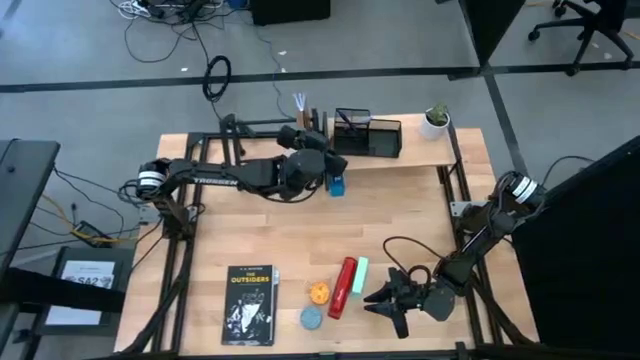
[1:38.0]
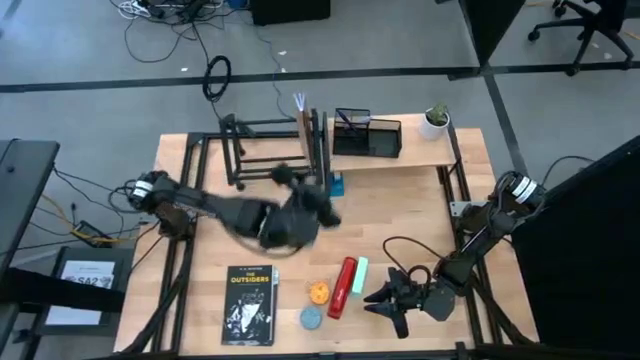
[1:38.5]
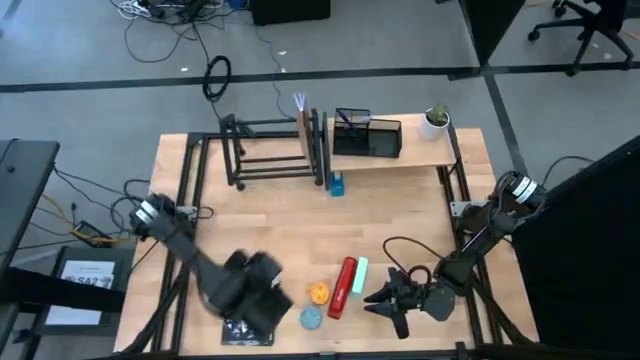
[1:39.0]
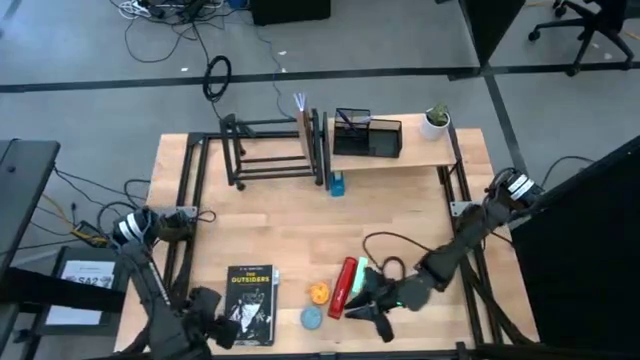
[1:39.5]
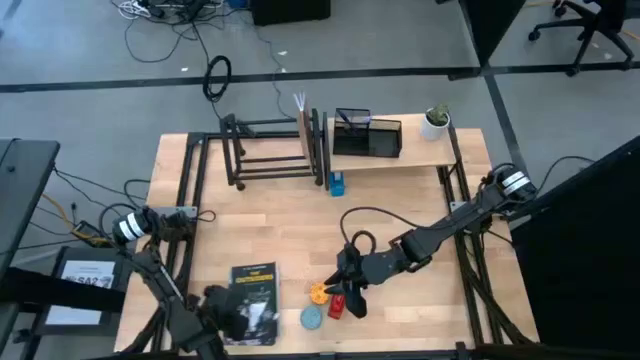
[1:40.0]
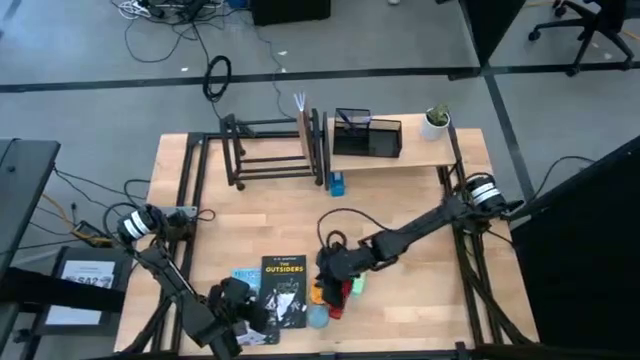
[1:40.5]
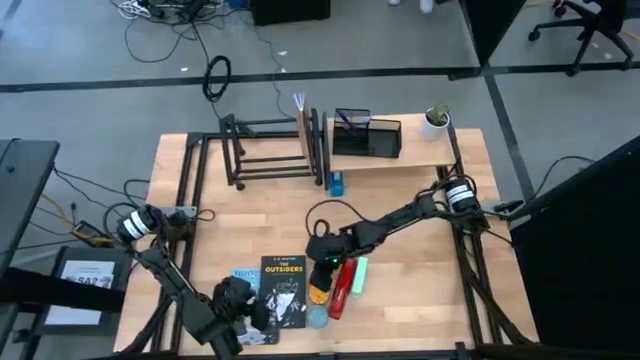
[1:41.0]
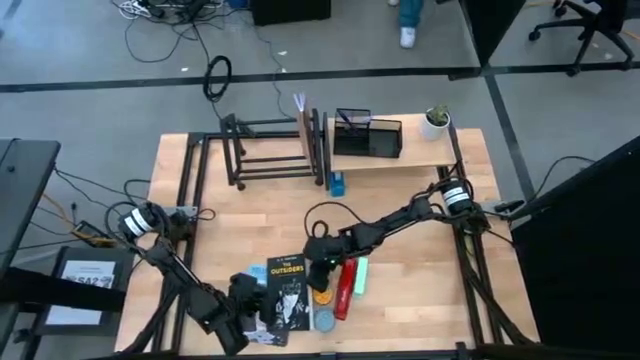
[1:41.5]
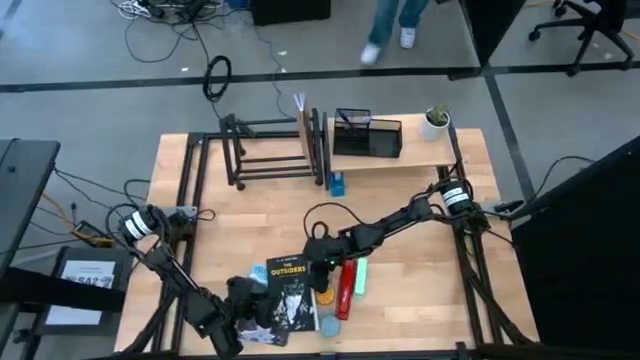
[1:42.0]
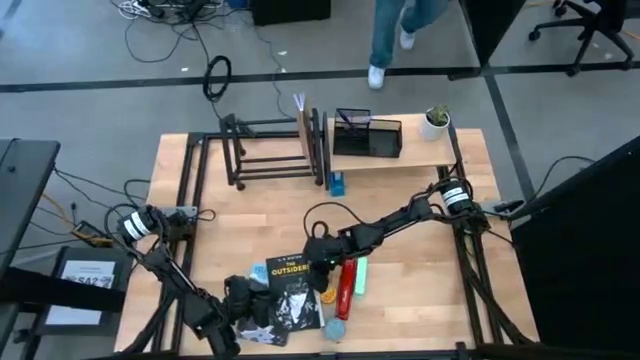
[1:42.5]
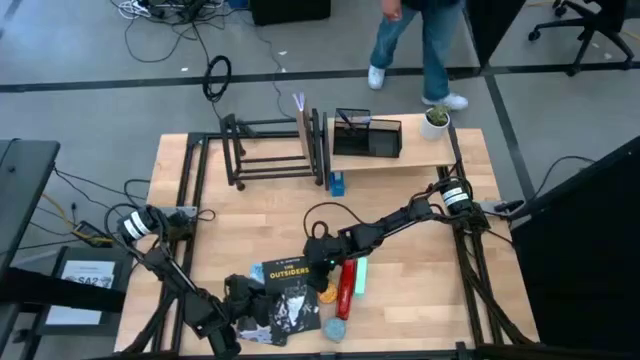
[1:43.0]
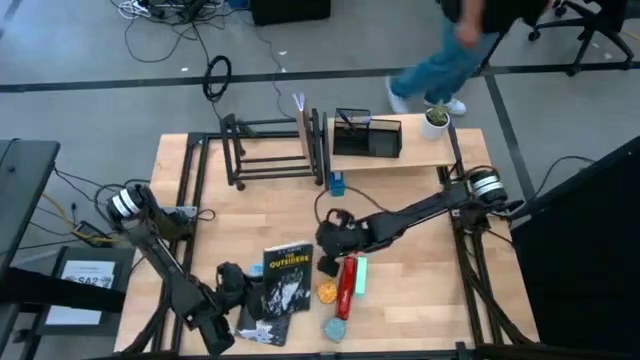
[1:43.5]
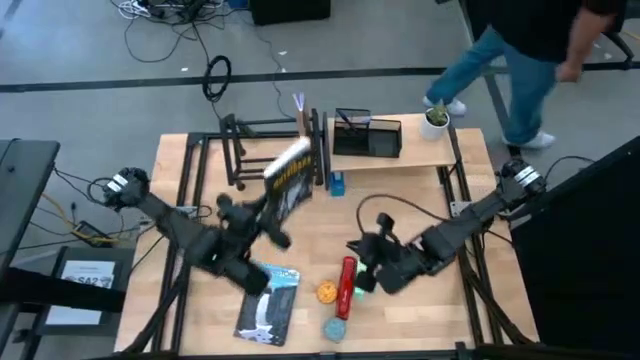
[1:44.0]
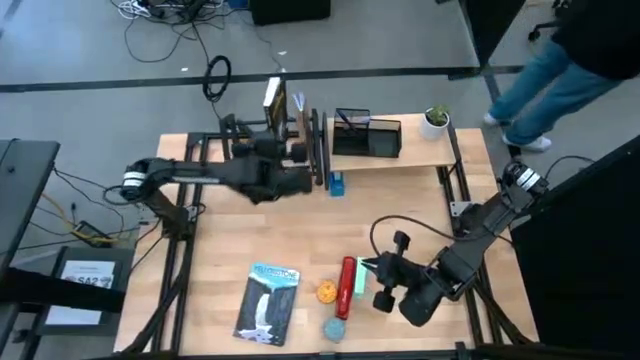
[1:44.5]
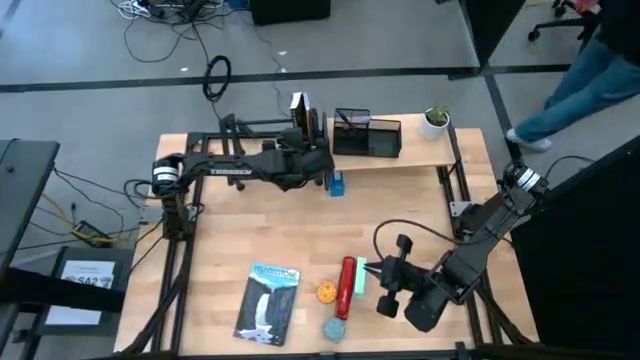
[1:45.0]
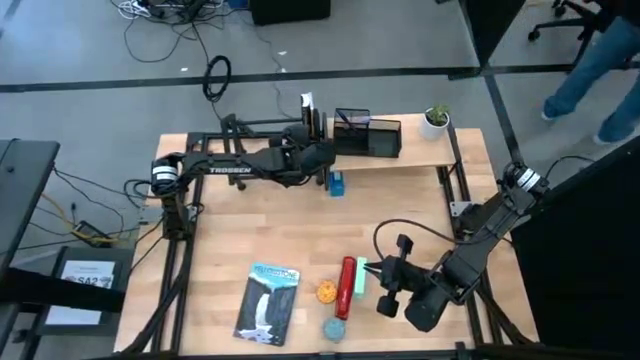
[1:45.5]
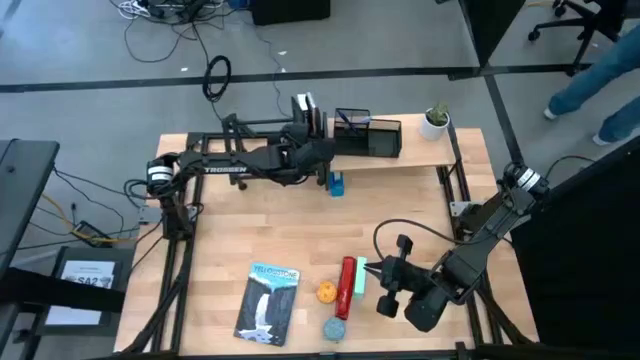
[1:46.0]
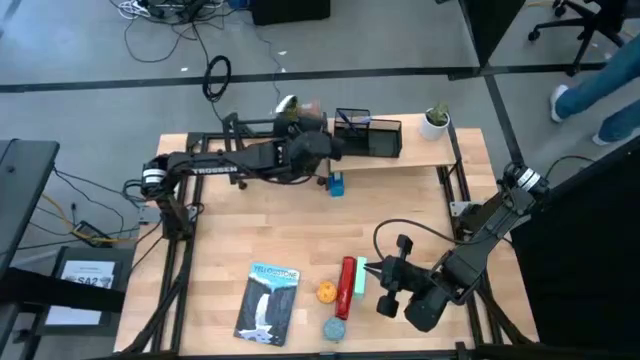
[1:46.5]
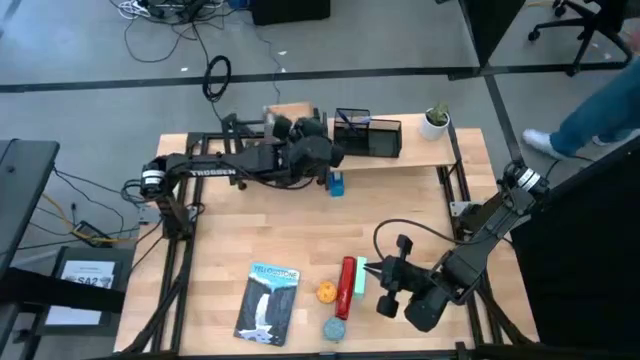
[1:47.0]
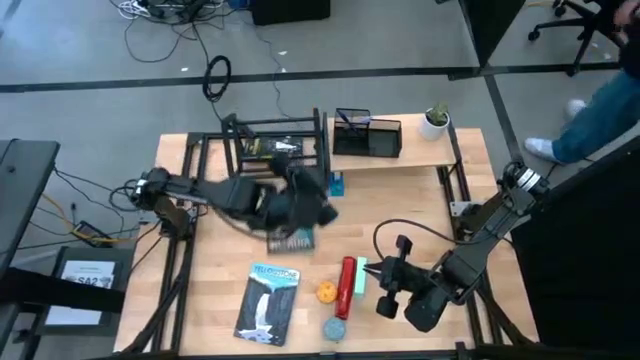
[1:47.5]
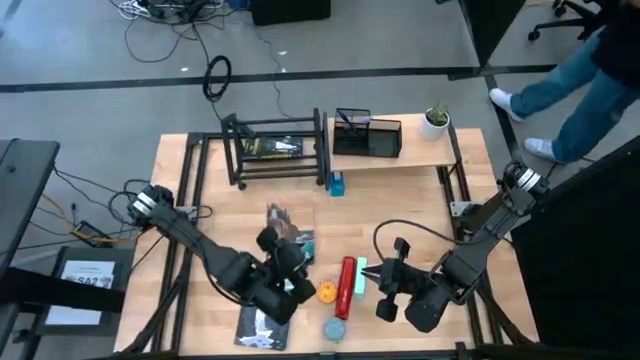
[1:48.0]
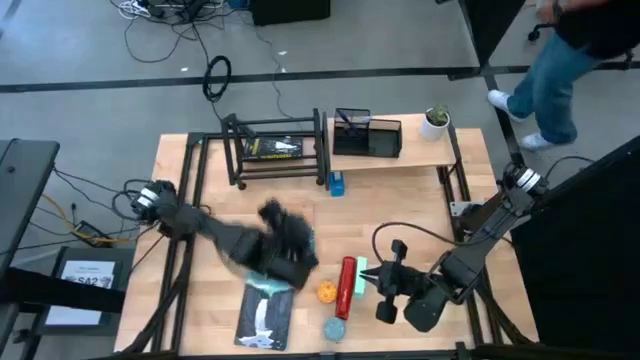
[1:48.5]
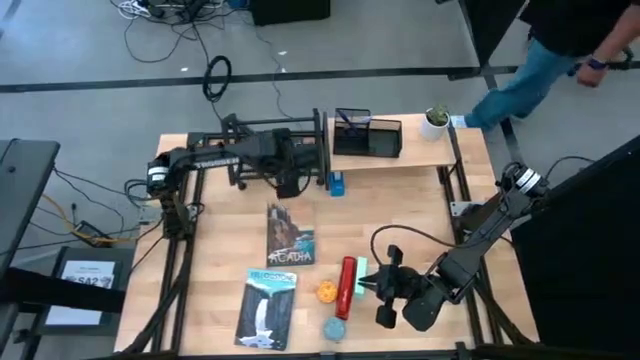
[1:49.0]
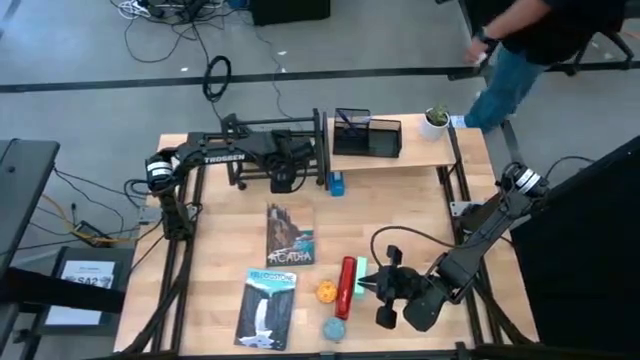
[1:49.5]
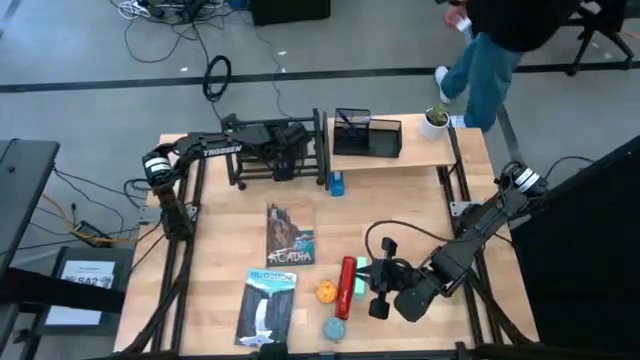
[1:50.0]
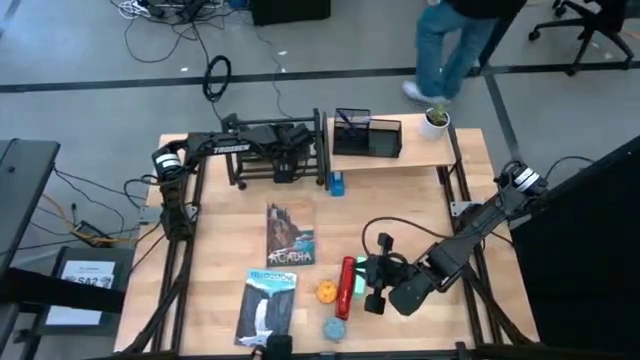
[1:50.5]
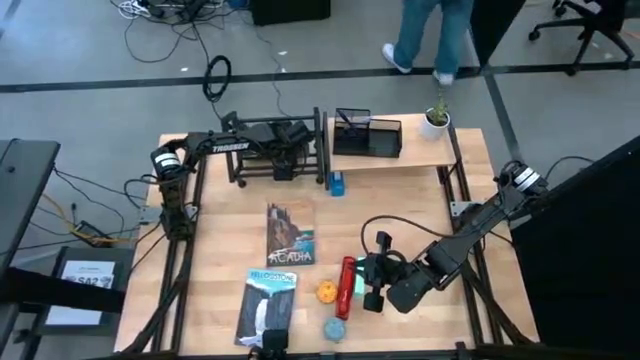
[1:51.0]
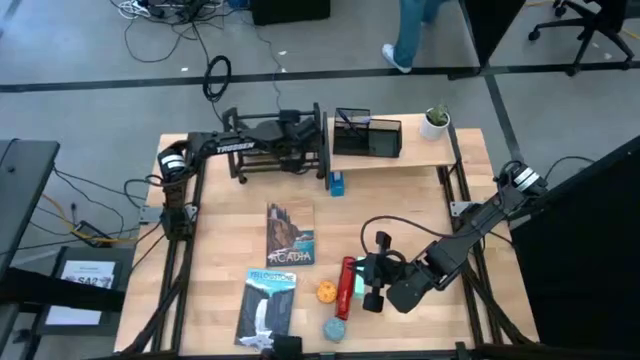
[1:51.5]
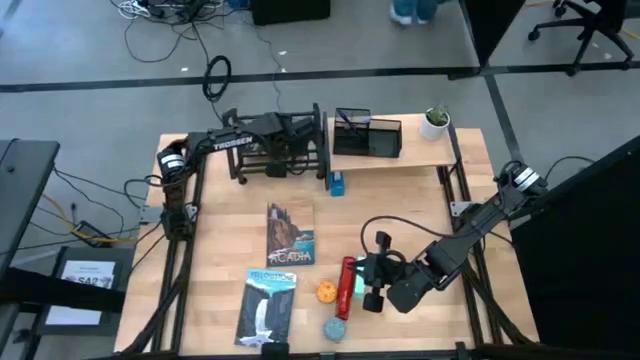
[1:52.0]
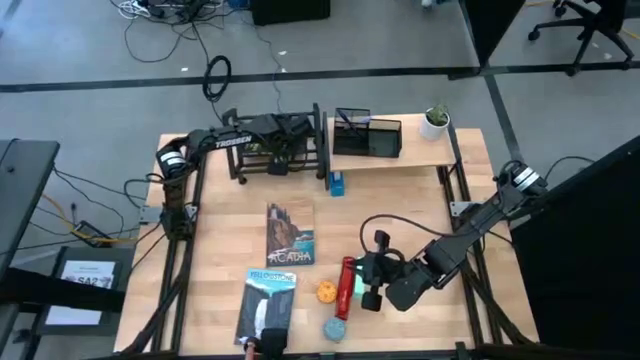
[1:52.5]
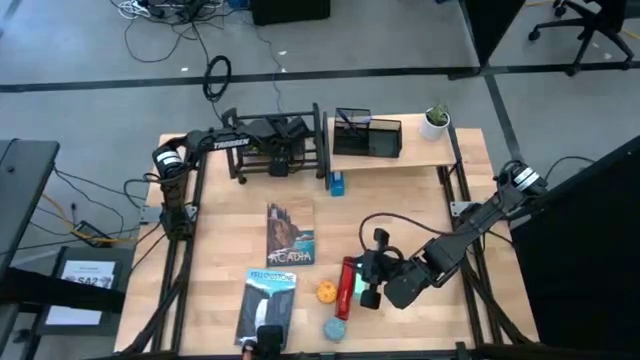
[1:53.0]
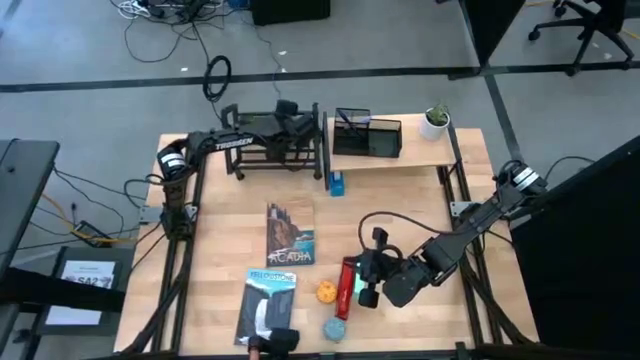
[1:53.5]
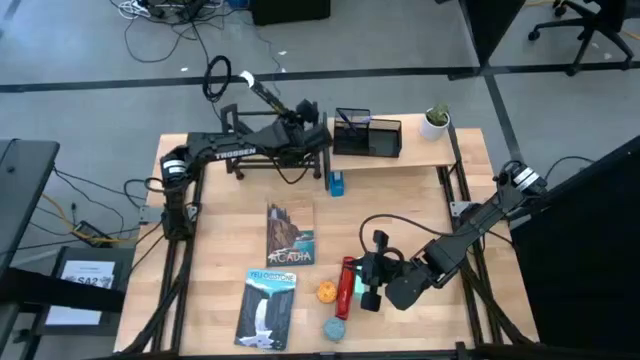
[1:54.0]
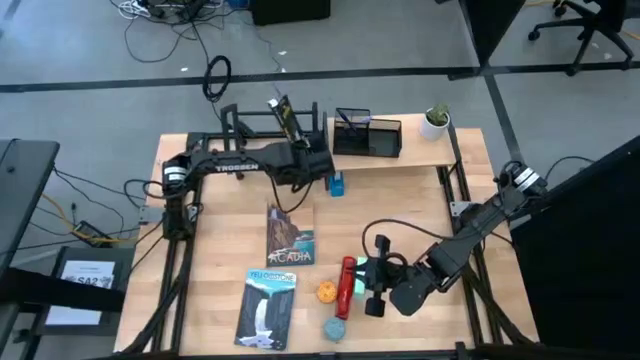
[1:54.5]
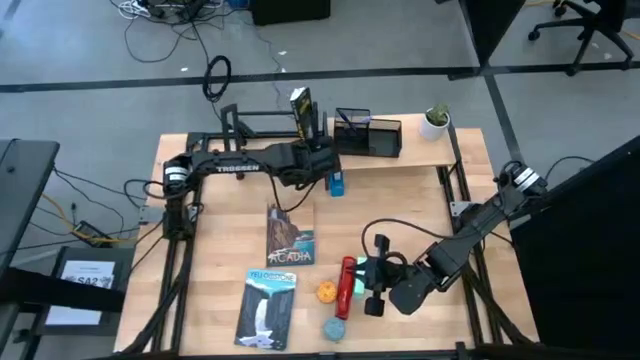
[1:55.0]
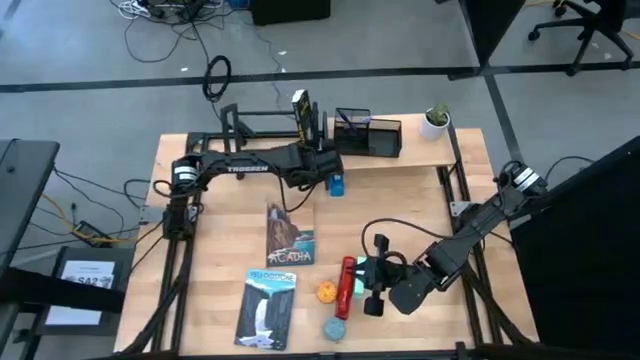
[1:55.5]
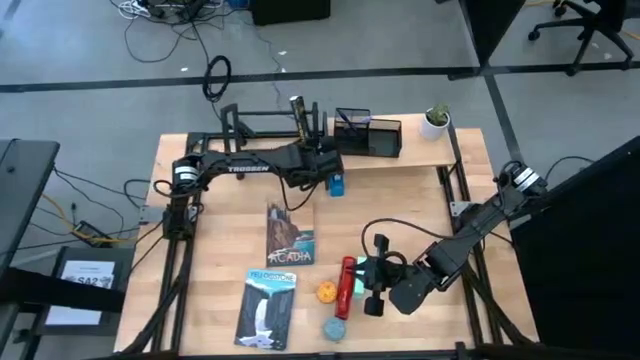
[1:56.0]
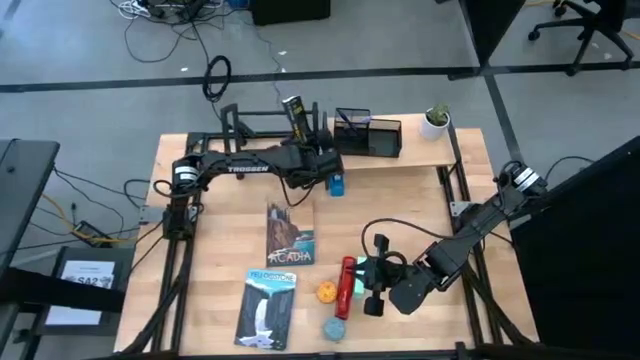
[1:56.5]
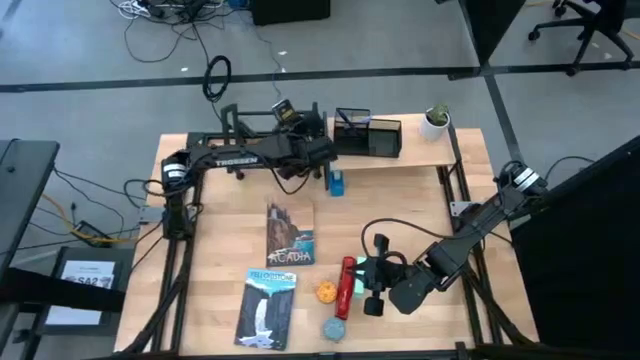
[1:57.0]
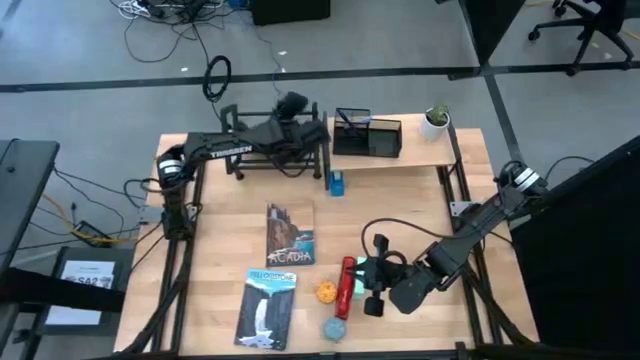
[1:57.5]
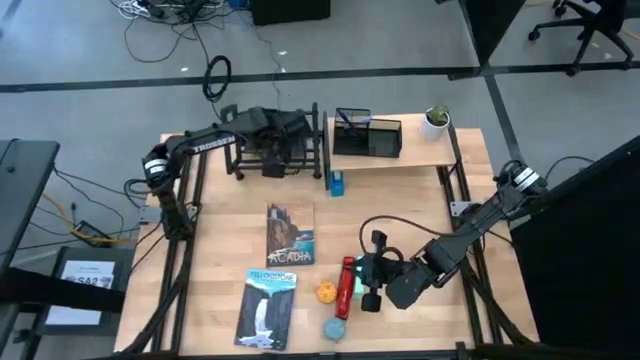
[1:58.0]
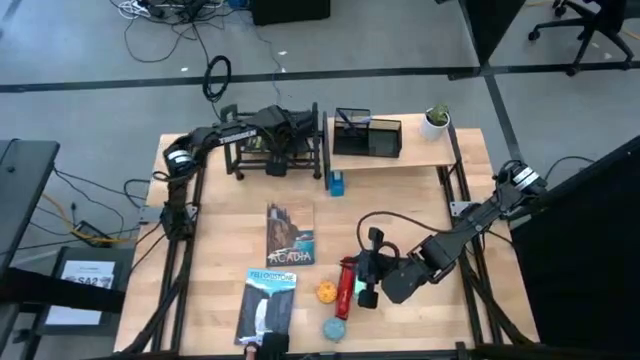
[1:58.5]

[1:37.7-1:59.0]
Task: Stock shelves
Put the black book on the book shelf

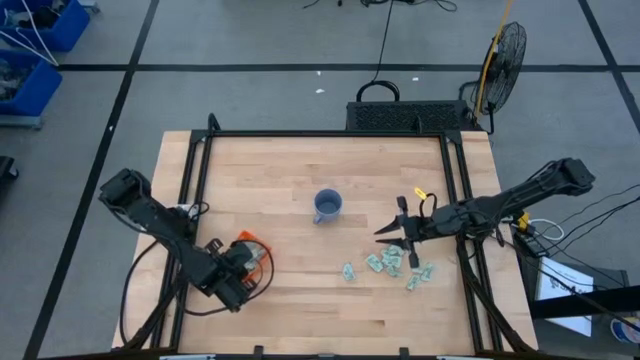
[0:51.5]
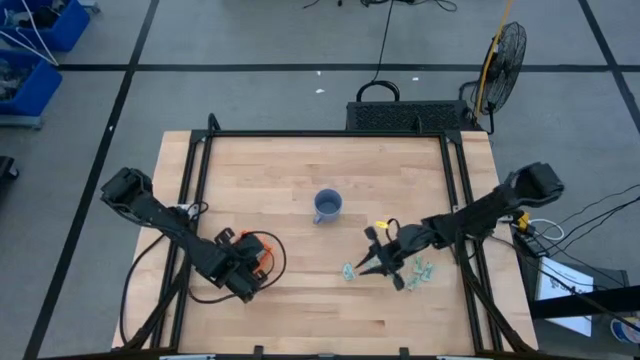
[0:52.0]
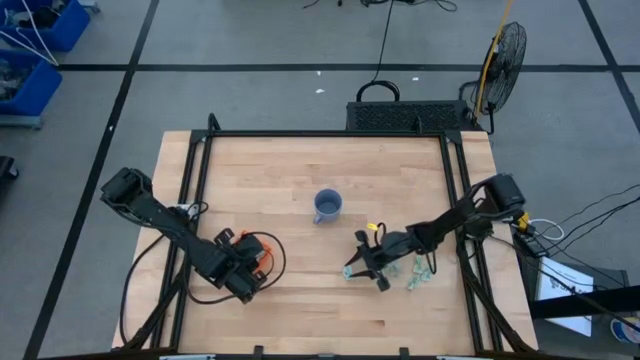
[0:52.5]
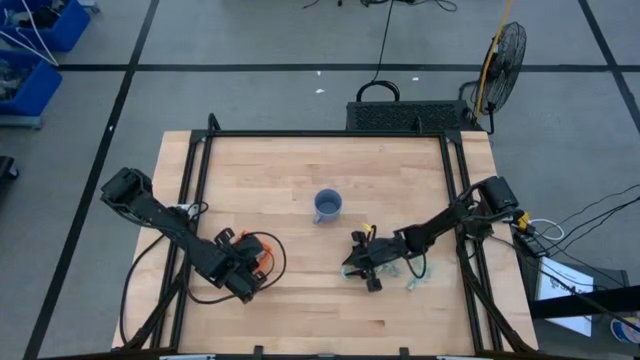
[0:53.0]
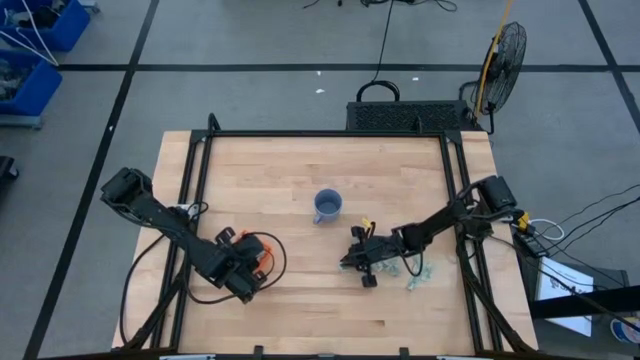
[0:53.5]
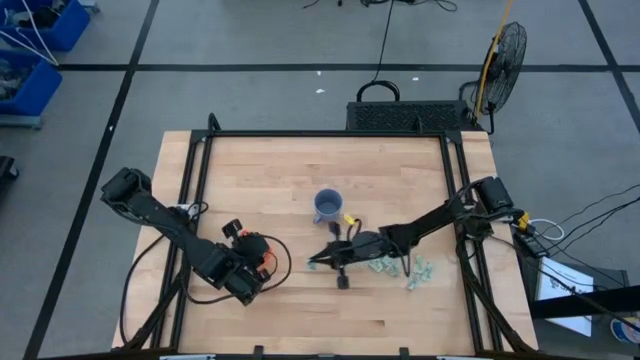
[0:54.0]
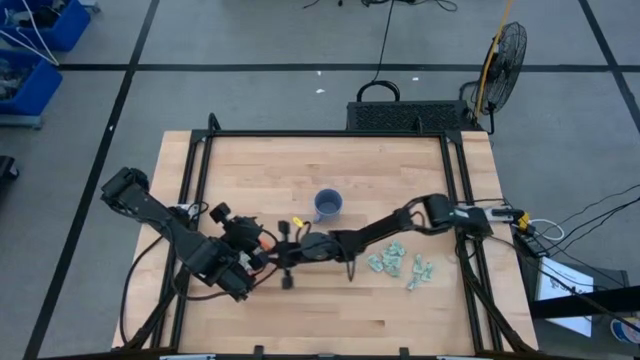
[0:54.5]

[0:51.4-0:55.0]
Task: Pick and place Stevia / Truvia into bins
Put the green stevia packet into the orange basket
